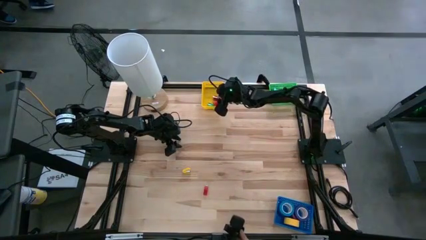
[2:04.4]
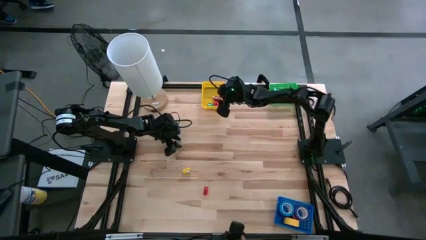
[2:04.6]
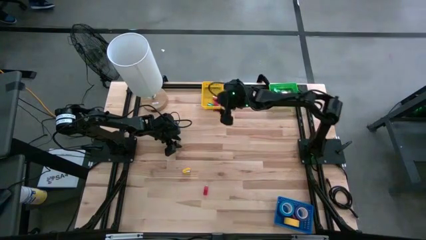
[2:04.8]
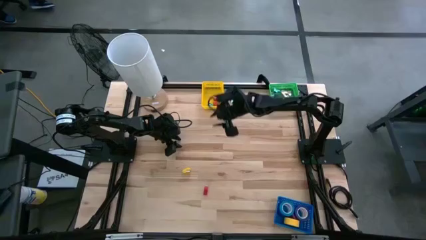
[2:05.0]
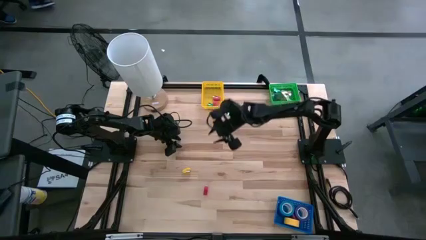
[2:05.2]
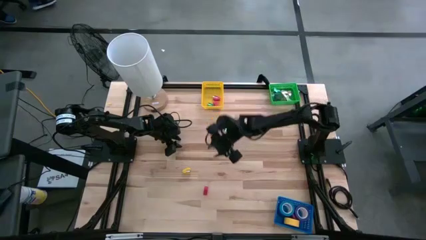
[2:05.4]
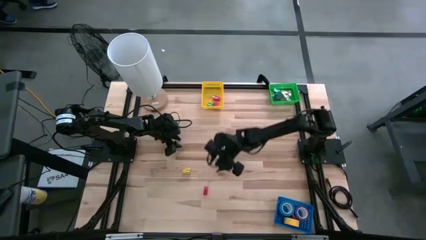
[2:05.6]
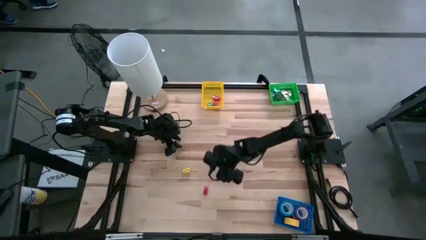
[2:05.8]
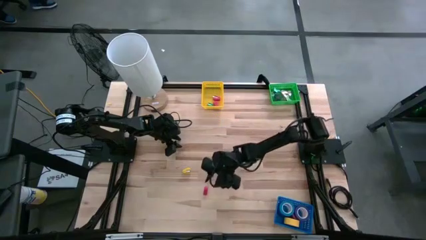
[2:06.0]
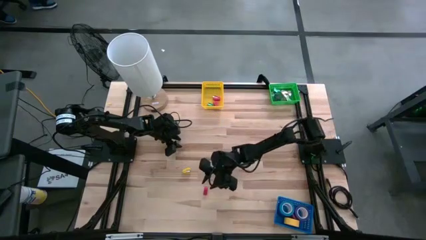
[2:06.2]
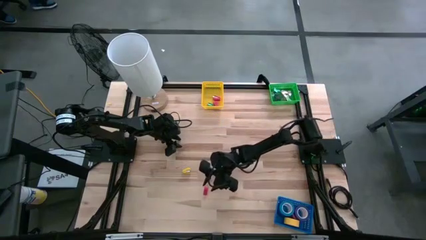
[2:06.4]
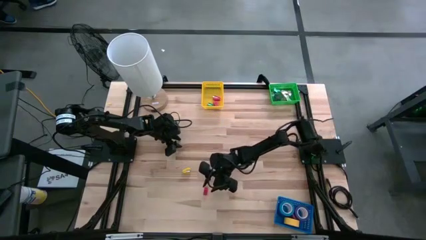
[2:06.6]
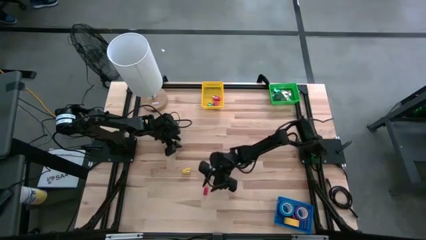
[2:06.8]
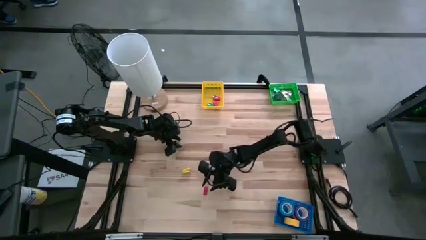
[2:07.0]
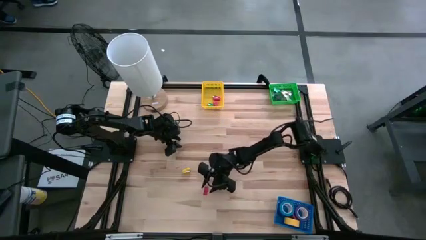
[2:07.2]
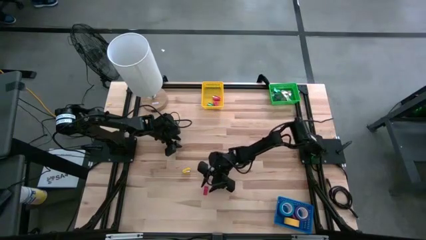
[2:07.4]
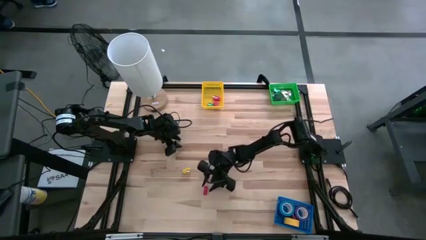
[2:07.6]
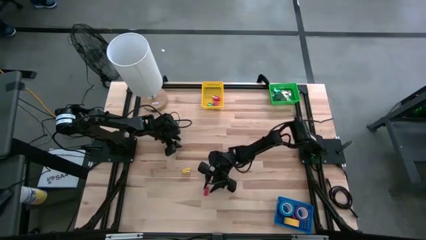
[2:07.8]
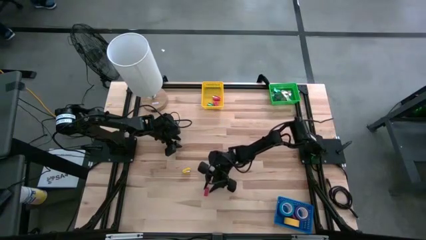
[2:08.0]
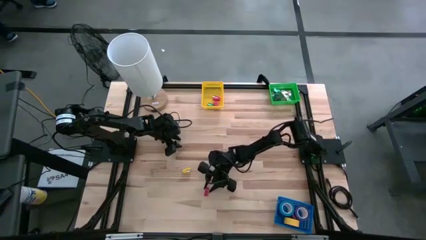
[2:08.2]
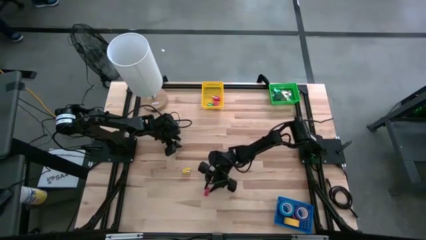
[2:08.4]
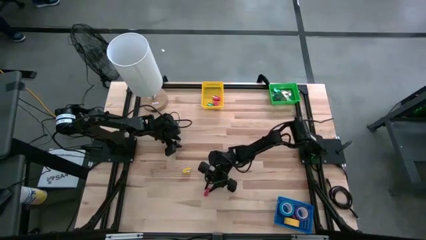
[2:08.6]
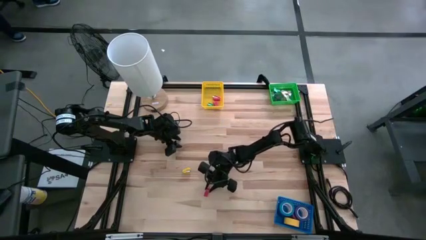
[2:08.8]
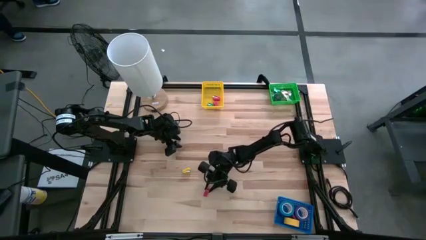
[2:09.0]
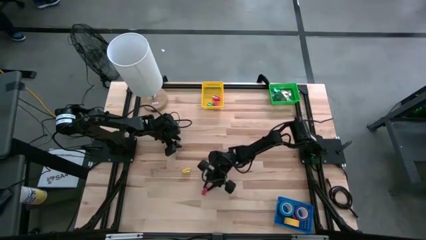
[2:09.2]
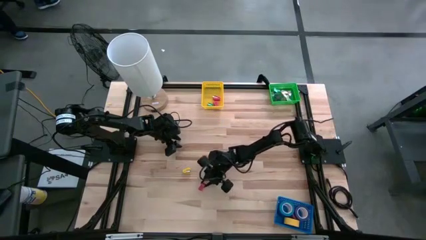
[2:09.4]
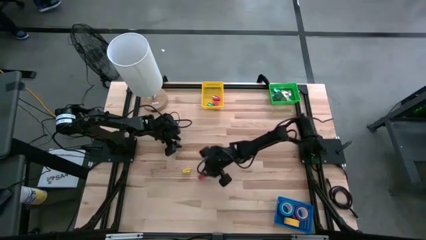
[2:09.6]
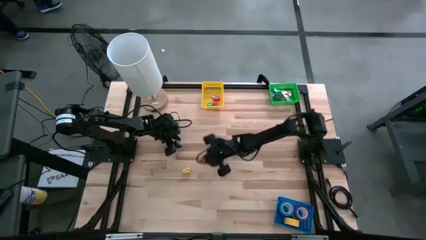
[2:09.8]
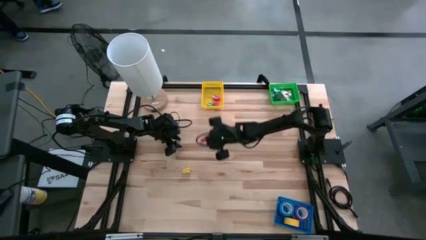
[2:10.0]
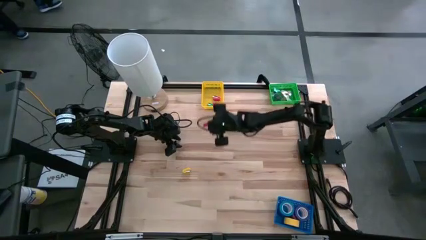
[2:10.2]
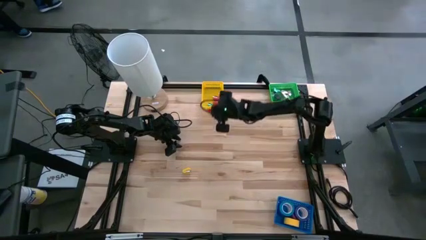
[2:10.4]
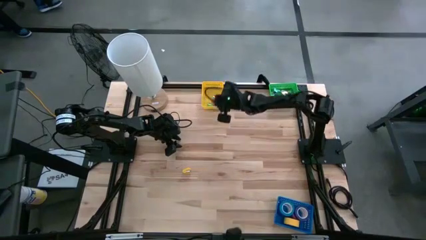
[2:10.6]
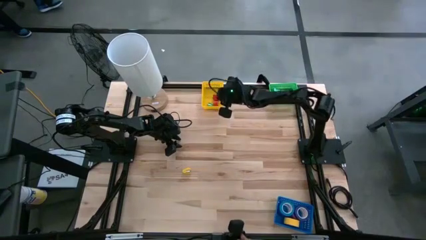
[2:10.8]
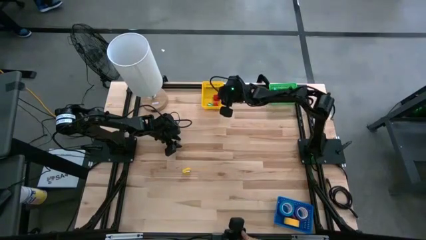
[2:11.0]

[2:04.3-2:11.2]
Task: Pick and place Stapler, Stapler remover, tape
Put the red stapler into the yellow bin

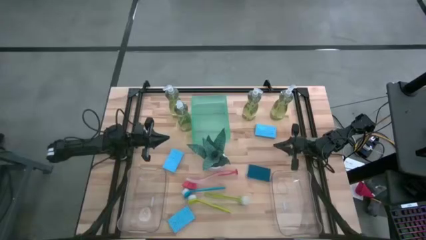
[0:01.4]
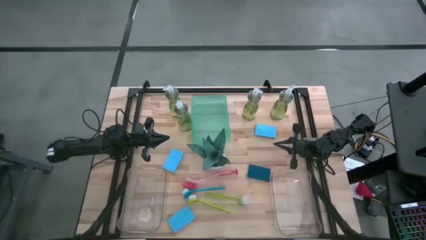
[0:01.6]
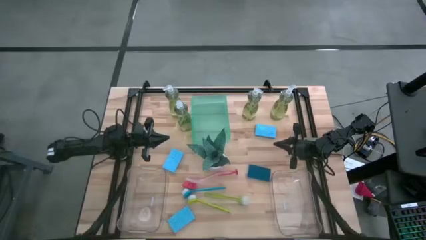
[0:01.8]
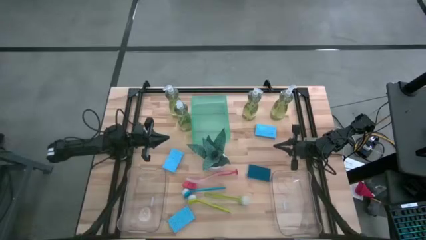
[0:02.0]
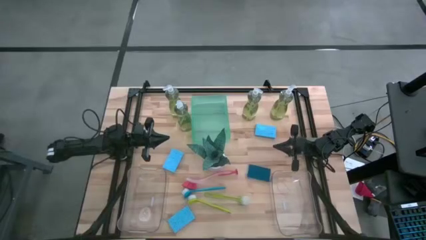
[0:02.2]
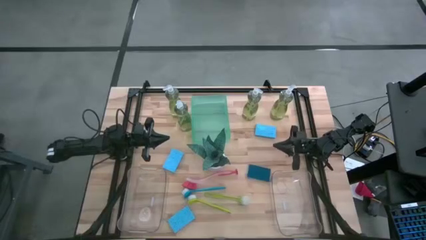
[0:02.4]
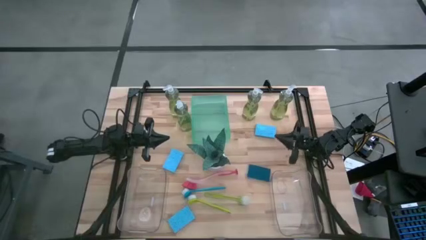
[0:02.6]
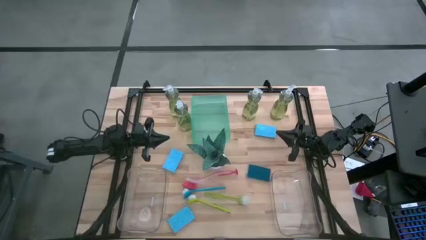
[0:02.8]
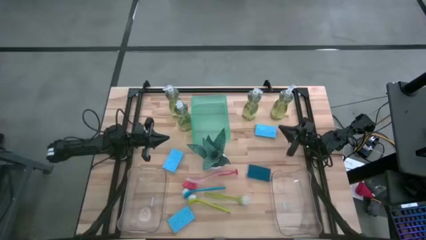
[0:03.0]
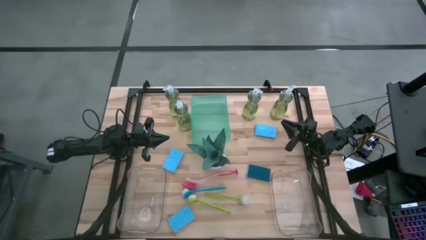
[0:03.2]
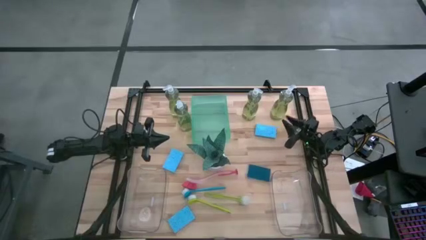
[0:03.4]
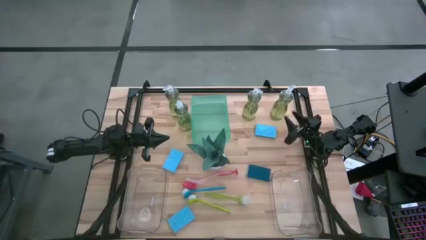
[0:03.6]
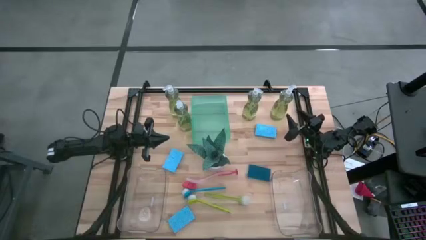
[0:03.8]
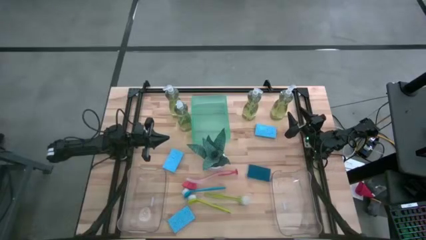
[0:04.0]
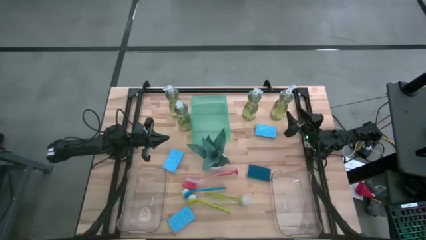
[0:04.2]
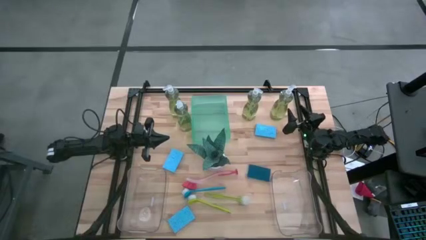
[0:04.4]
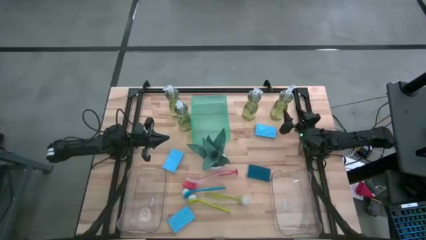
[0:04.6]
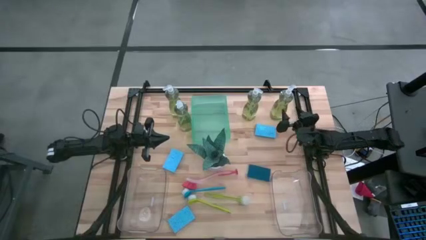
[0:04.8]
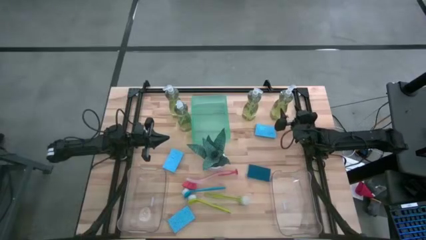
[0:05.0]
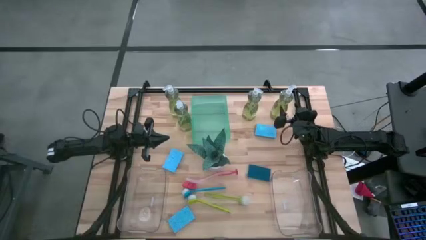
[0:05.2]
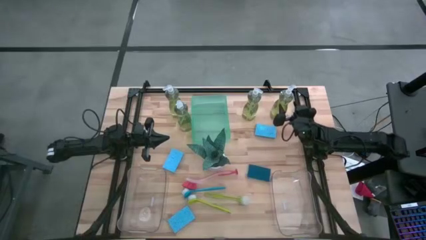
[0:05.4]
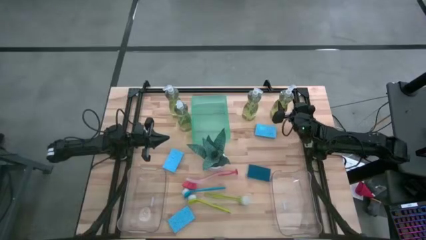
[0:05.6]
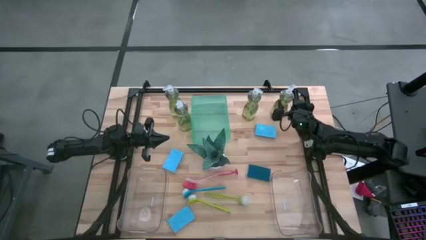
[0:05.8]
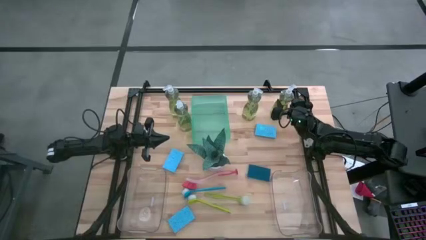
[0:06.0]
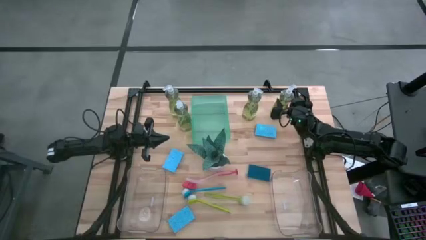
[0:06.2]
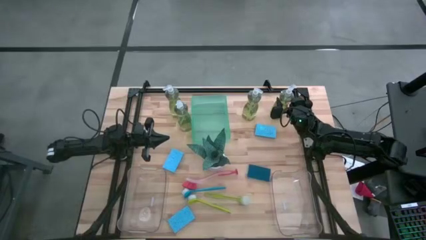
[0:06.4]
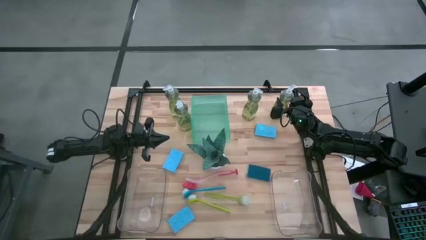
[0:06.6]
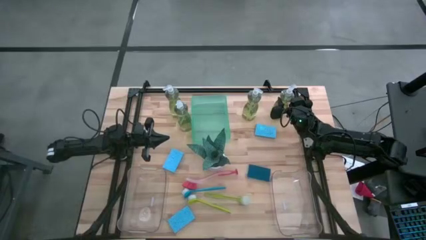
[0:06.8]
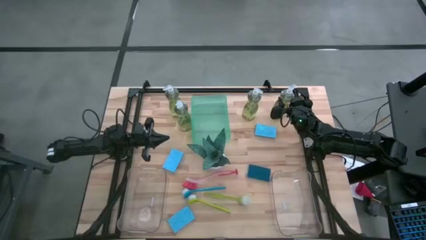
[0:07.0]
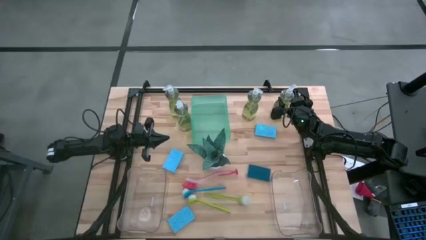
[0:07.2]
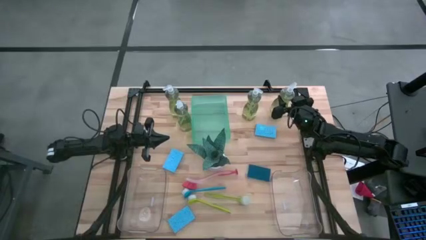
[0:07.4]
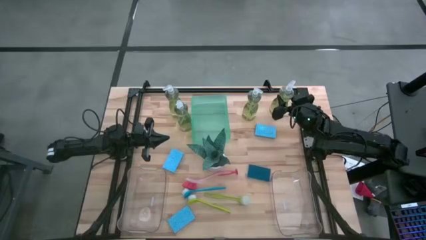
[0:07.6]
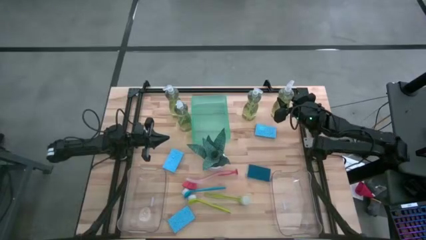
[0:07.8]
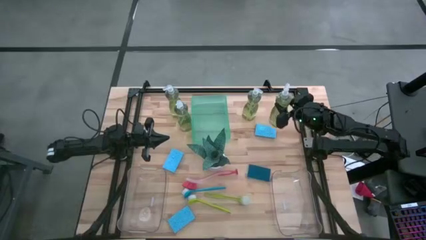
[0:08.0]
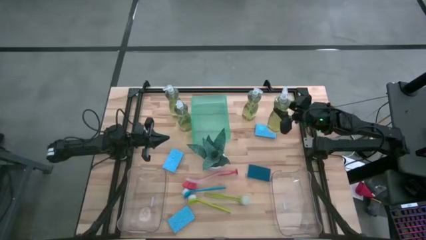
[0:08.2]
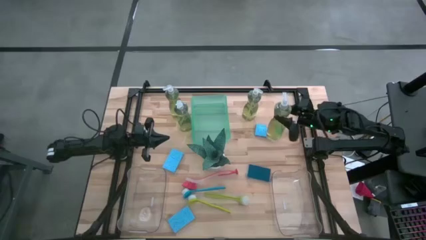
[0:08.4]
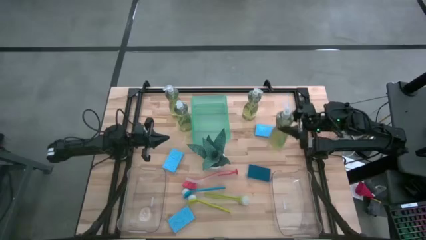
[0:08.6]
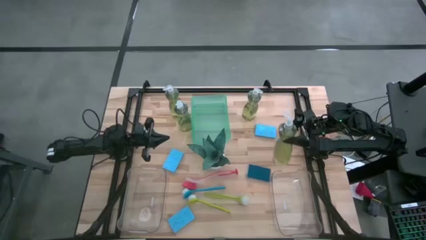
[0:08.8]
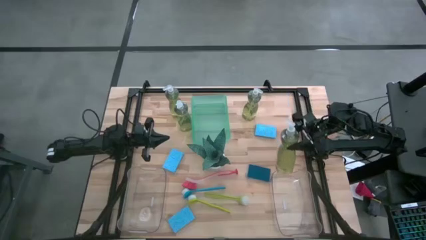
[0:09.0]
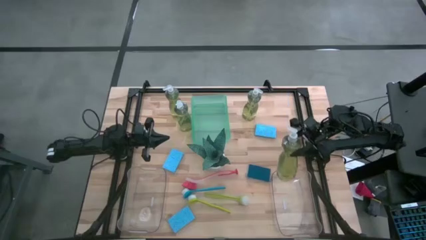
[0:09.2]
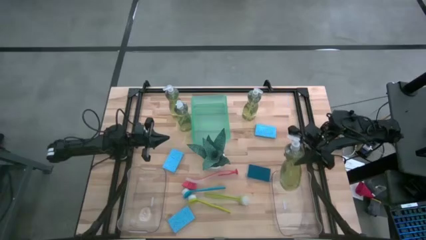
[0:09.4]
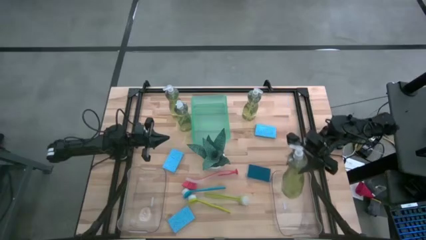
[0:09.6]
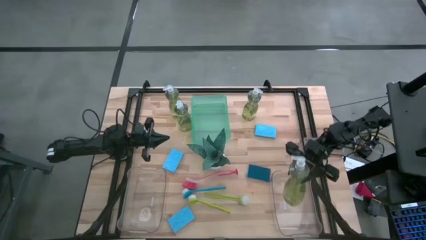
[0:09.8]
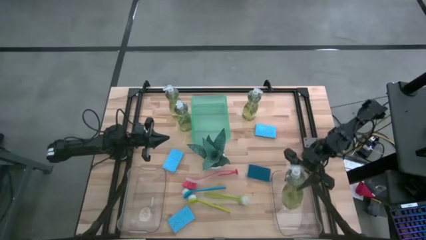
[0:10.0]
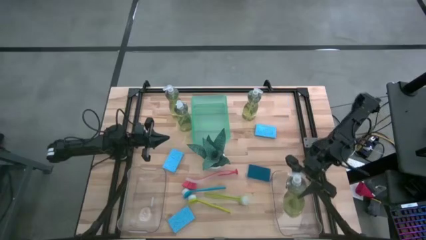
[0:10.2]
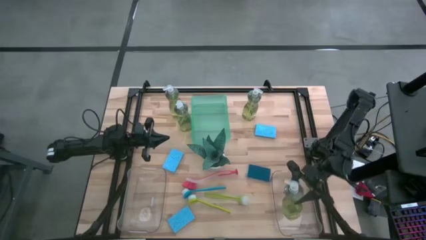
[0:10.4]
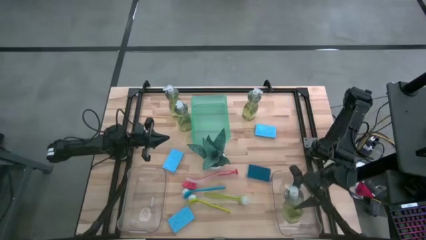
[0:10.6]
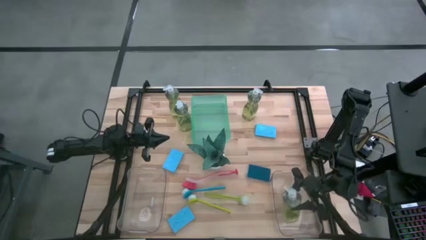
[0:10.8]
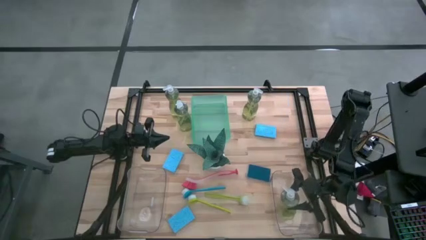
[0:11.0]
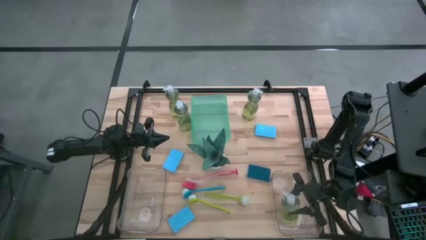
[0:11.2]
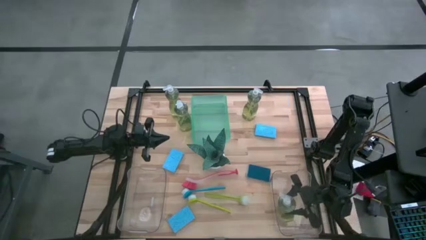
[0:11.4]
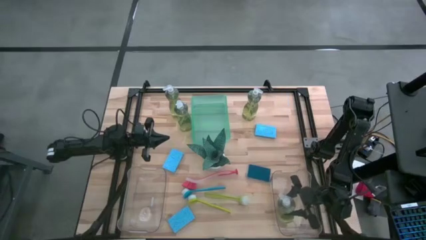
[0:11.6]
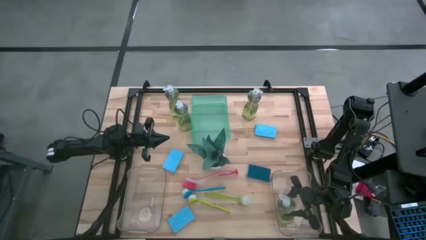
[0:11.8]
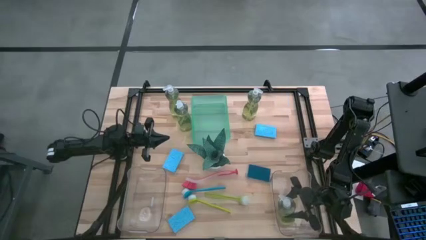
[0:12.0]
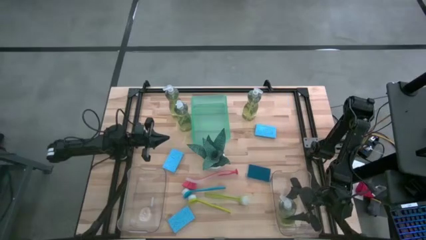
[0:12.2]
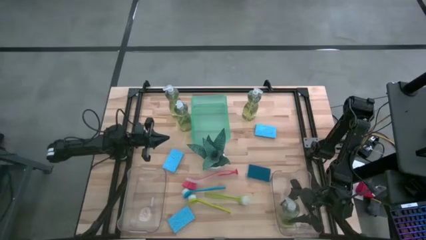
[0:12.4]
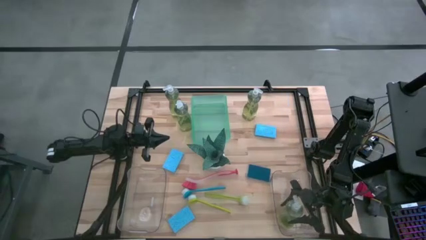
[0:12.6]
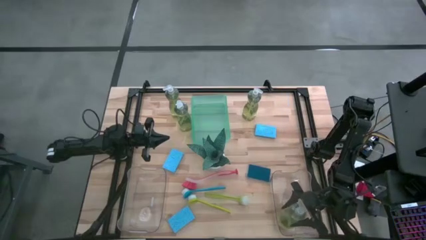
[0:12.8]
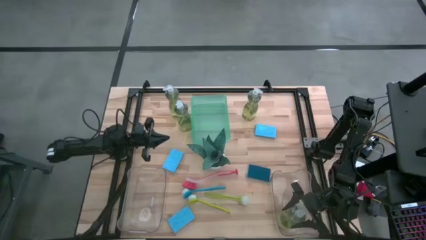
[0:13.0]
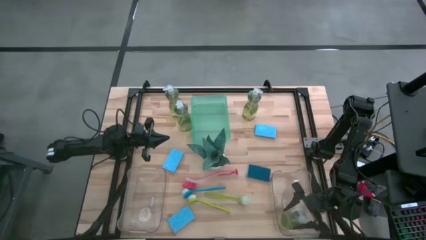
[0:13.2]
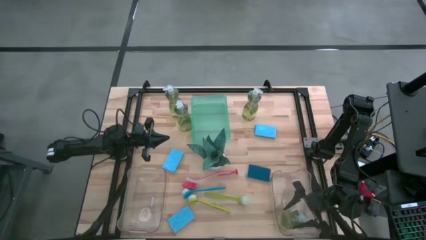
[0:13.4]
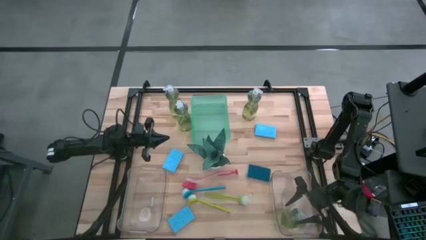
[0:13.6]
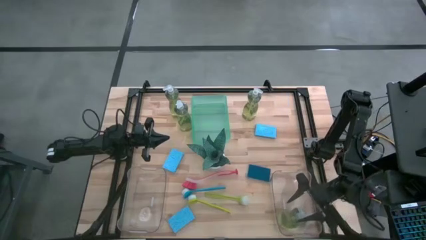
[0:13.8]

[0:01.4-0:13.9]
Task: Pick & Place Kitchen Sink Supplies
Put the yellow soap dispenser into the right transparent bin
